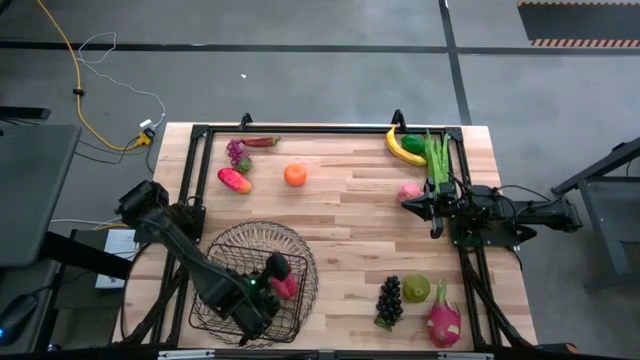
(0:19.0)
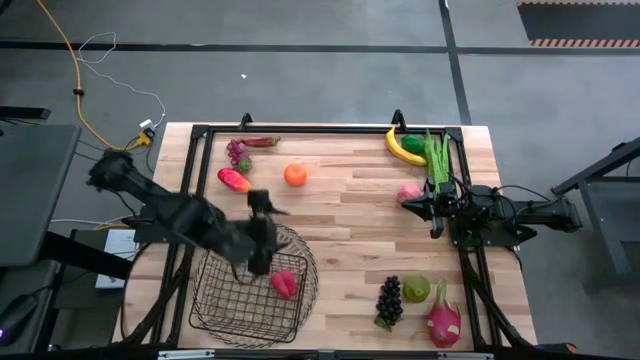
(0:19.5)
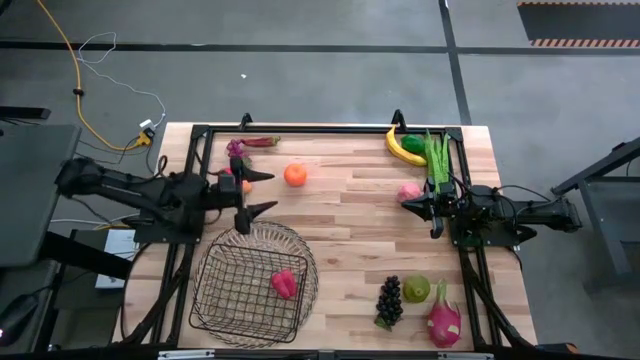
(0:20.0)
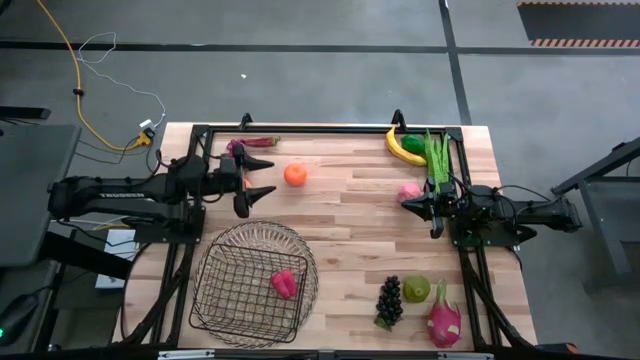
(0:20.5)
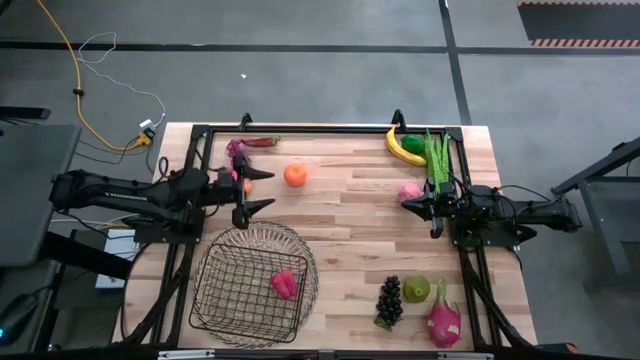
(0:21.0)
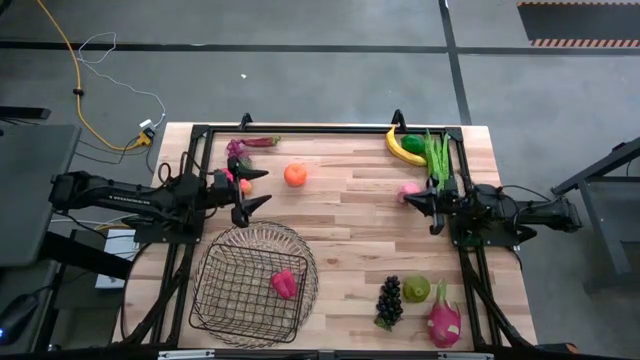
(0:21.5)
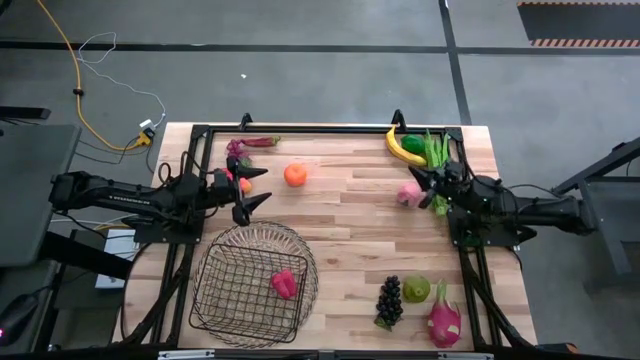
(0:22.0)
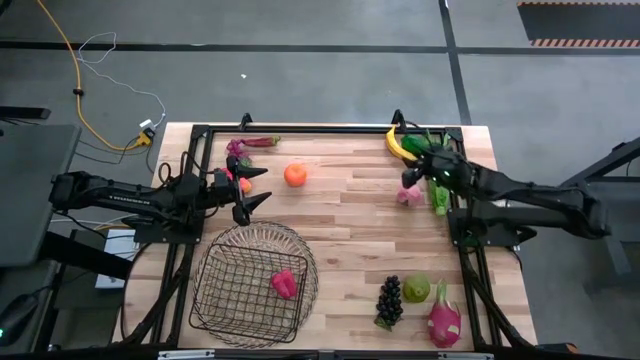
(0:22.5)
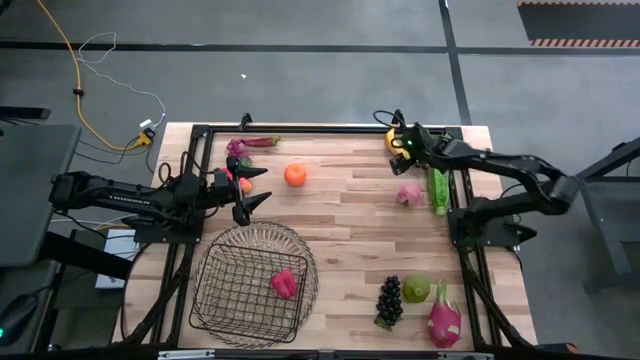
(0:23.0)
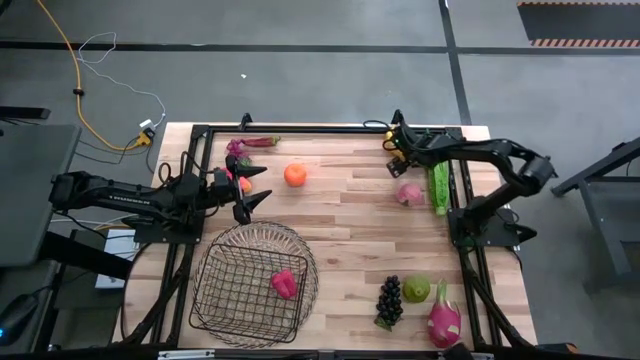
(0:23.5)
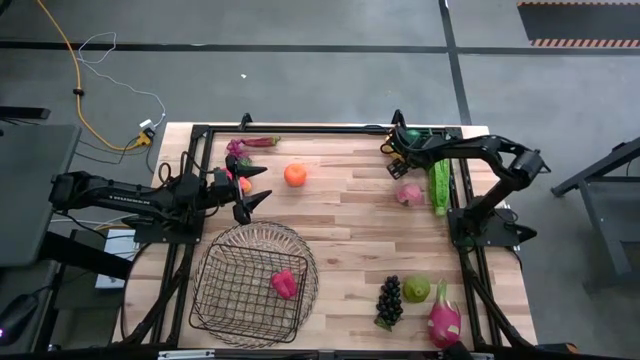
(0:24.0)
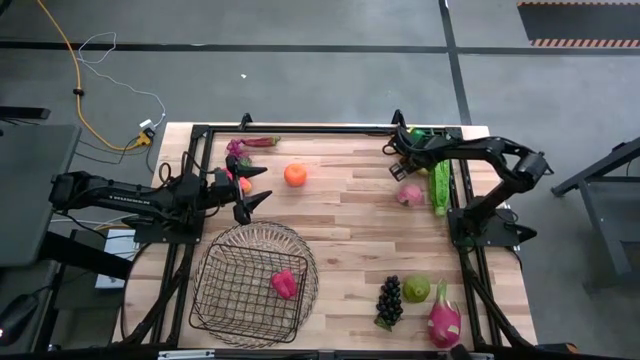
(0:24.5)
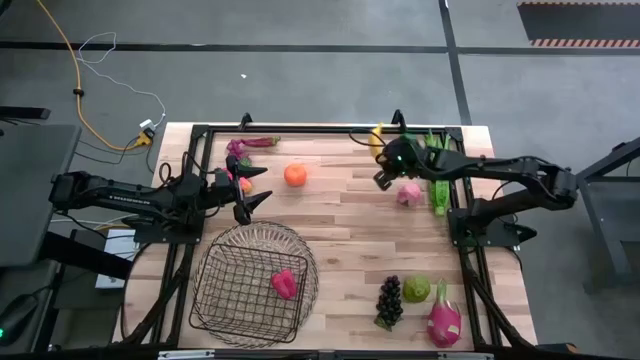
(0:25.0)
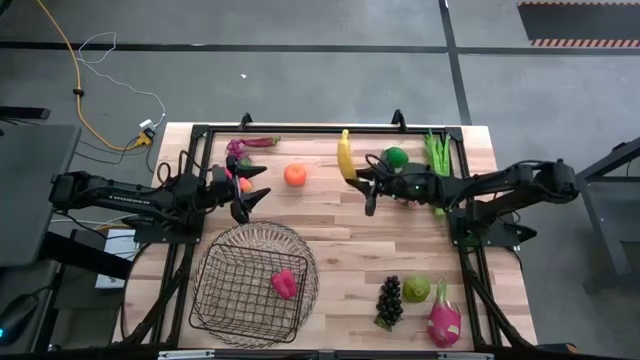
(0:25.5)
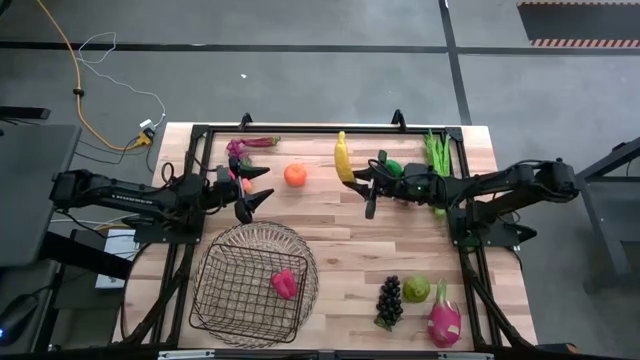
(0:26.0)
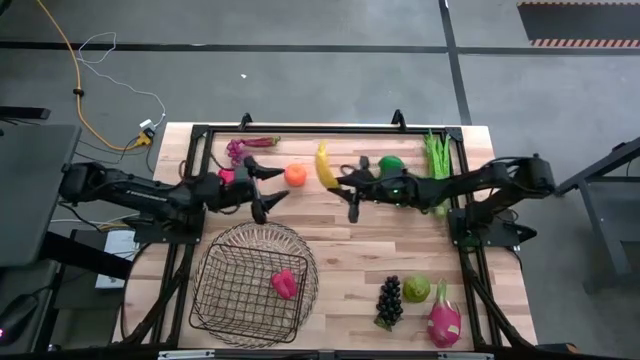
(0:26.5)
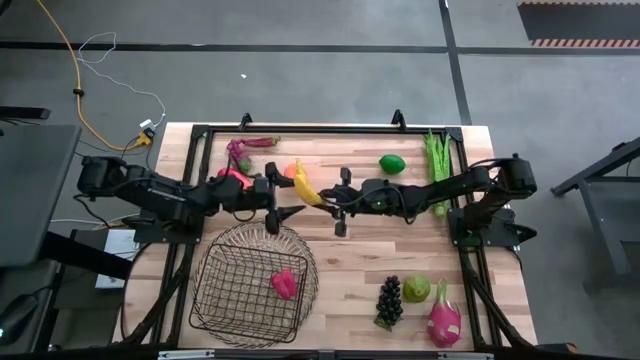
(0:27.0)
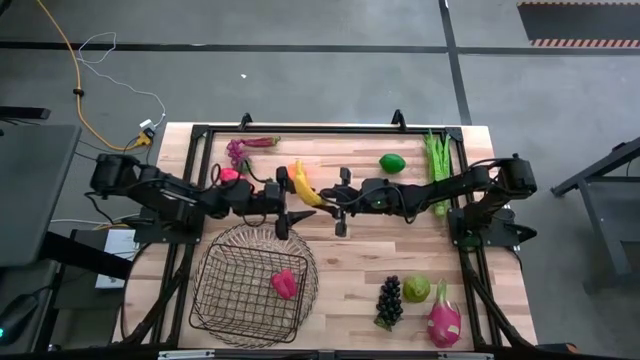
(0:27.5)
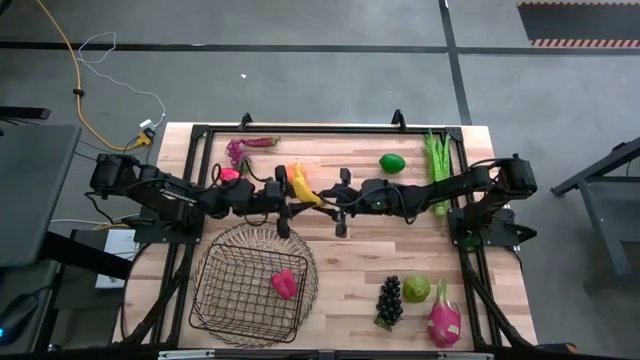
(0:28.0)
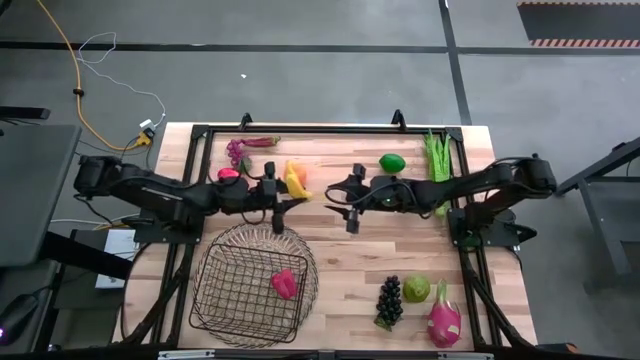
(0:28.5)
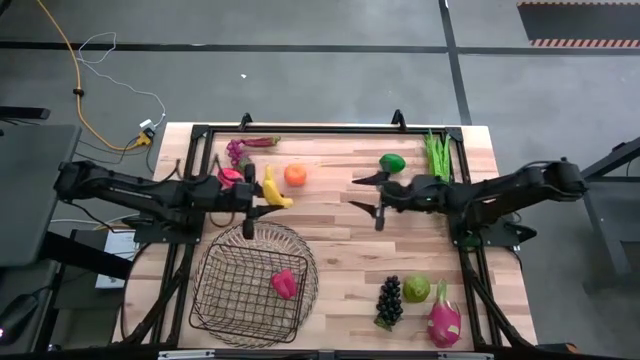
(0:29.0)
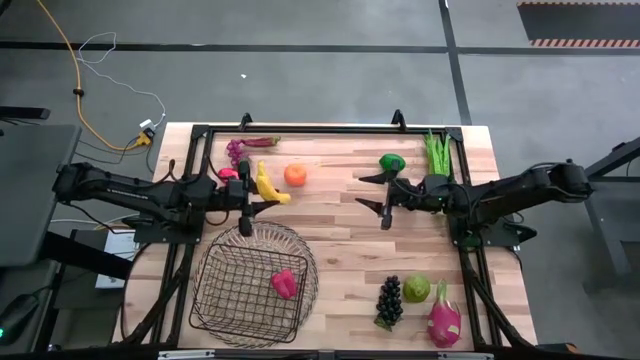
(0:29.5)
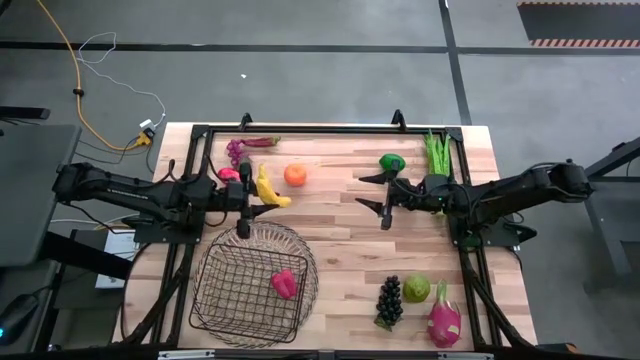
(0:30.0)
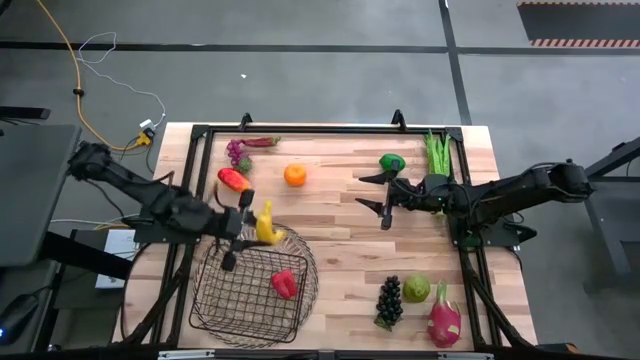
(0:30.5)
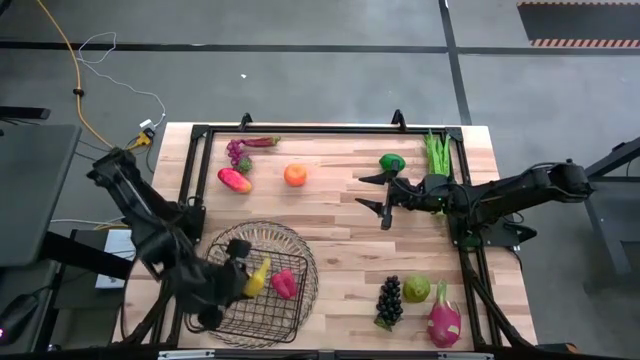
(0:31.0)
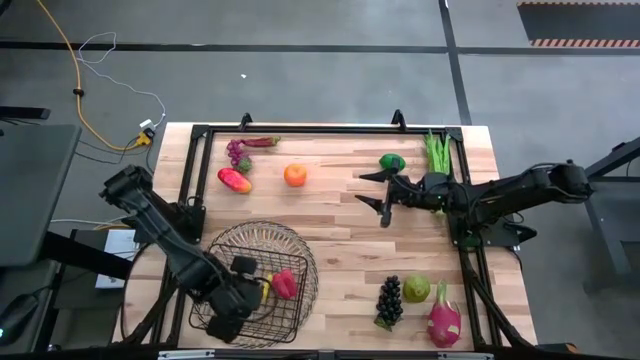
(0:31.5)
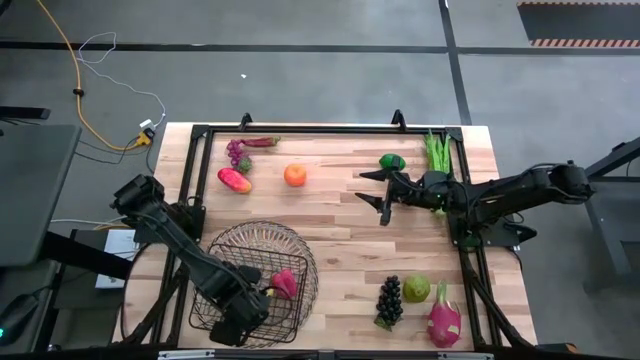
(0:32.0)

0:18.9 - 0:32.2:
Task: Build produce basket
Put the yellow banana into the black wire basket

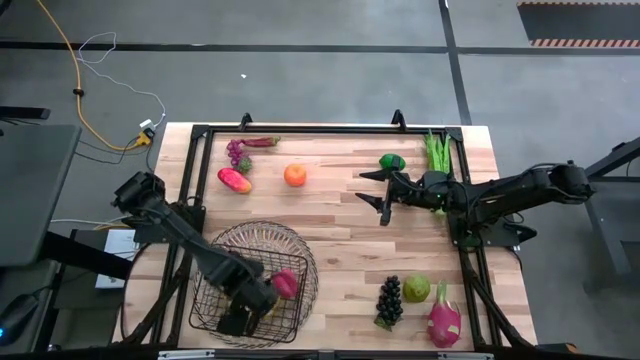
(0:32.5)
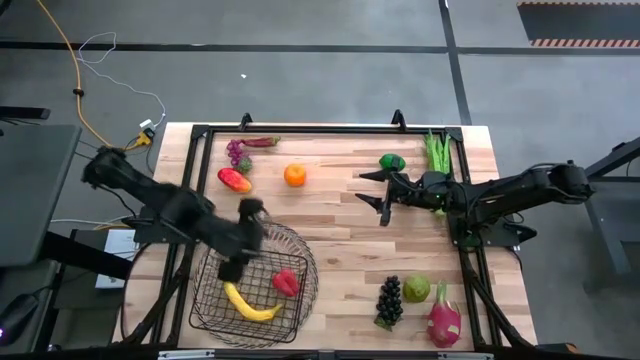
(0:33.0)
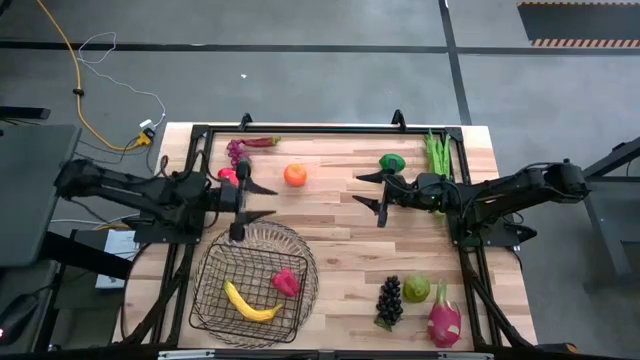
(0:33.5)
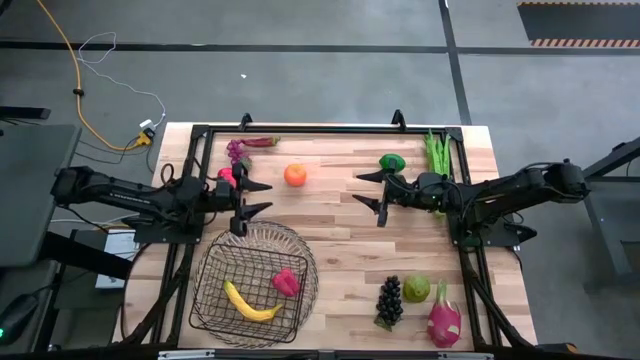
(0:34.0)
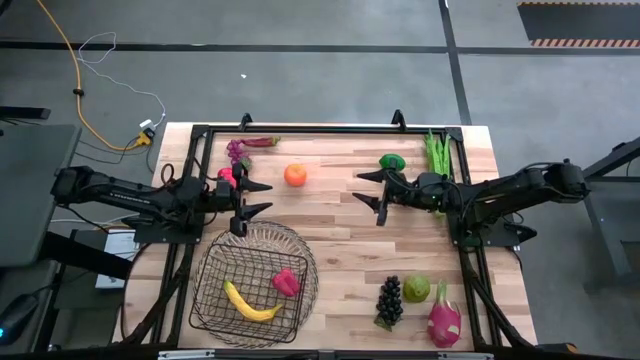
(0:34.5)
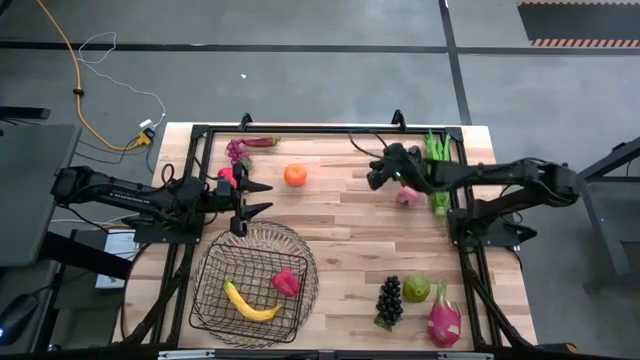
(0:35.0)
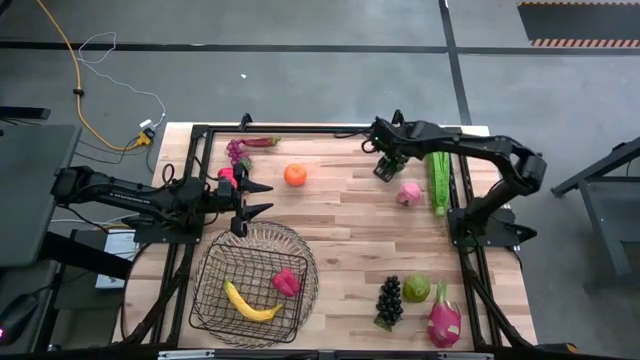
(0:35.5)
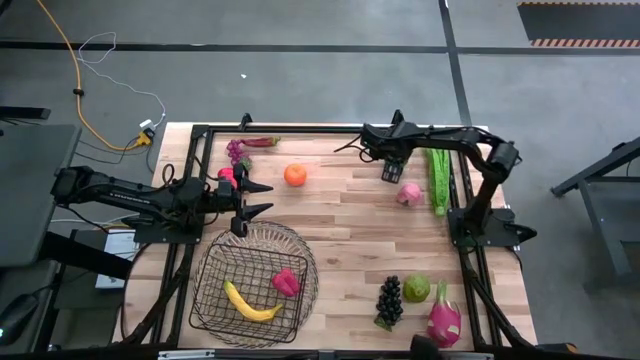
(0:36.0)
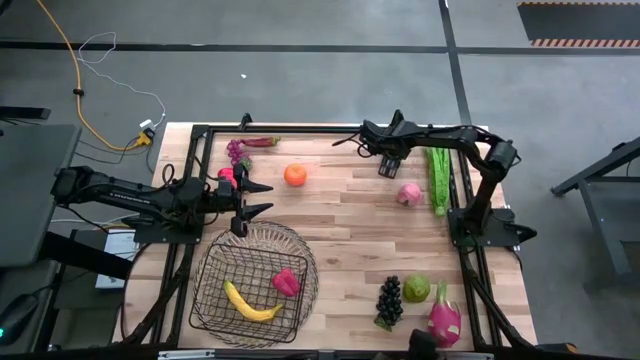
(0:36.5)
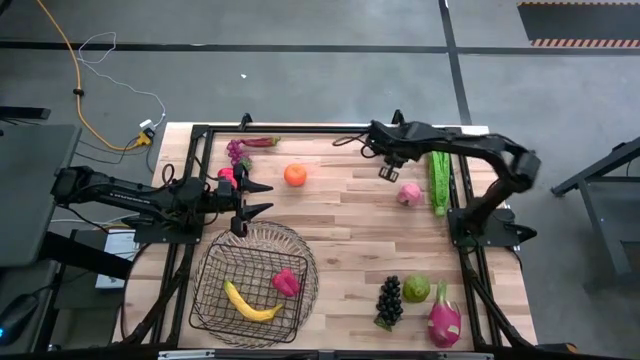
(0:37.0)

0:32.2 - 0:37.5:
Put the green lime into the black wire basket

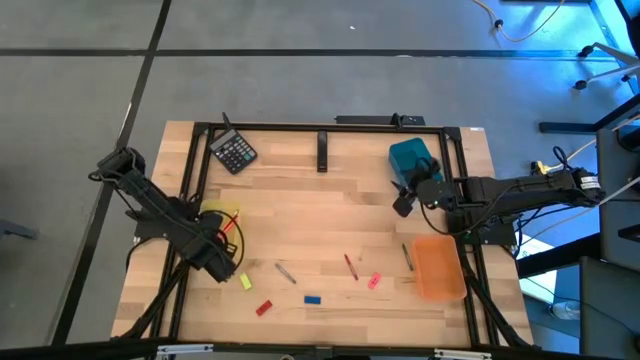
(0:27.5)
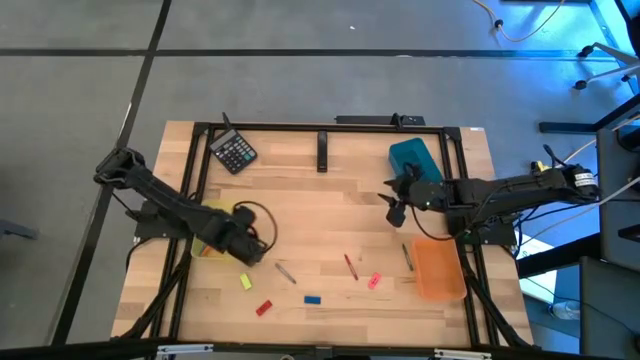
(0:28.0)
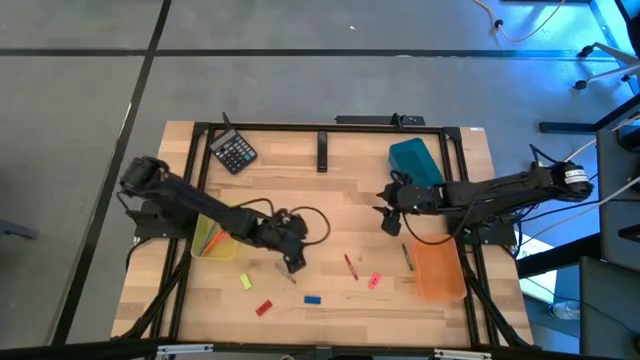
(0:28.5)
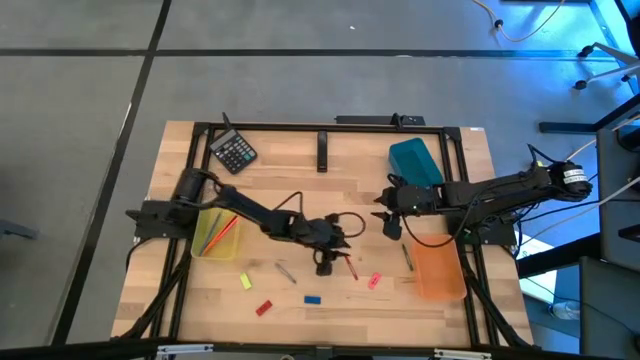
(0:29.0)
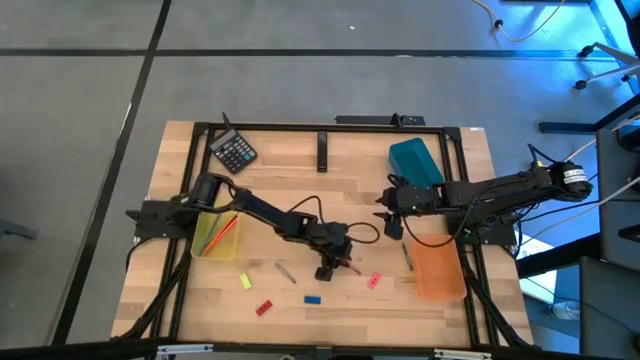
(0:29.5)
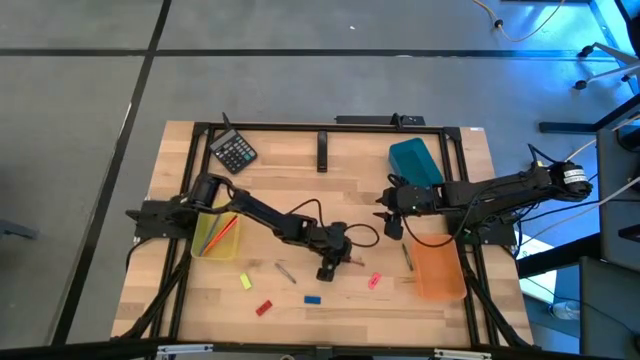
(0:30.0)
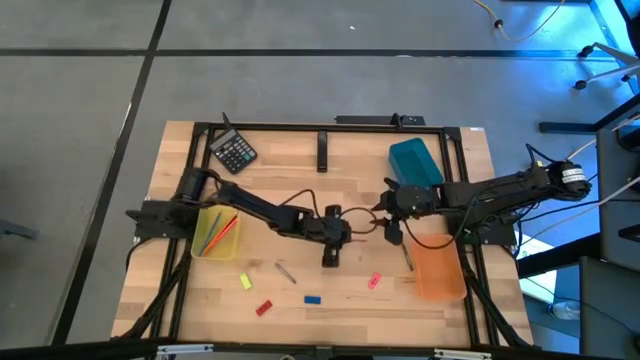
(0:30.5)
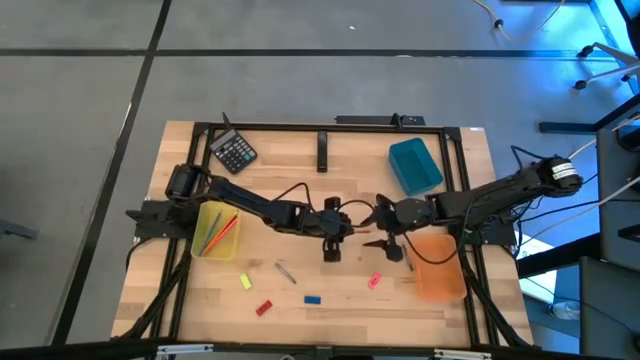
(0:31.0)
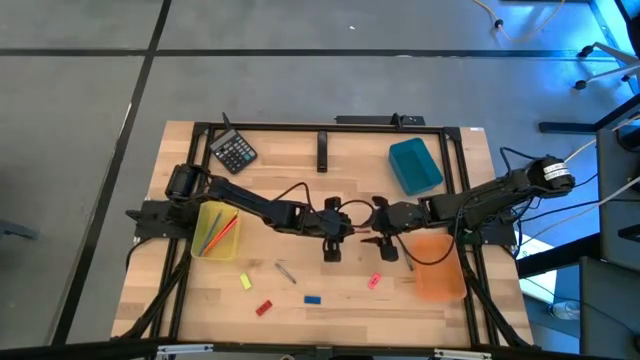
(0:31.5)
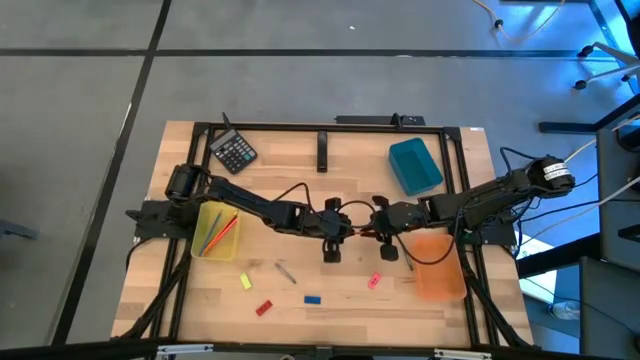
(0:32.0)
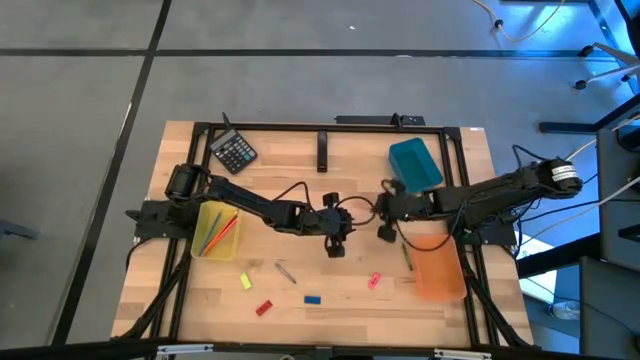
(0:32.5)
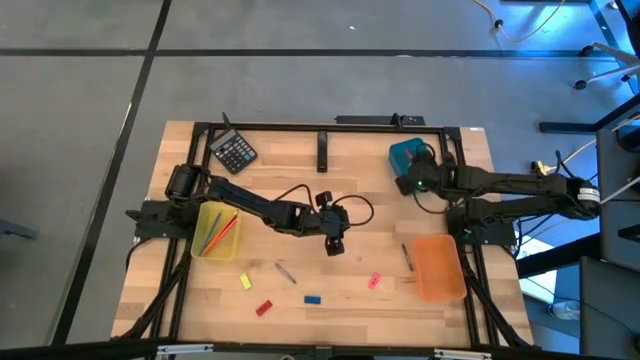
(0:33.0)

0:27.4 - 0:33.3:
Task: Sort crayons/erasers/pens/pencils in bins
Put the red crayon into the blue bin
